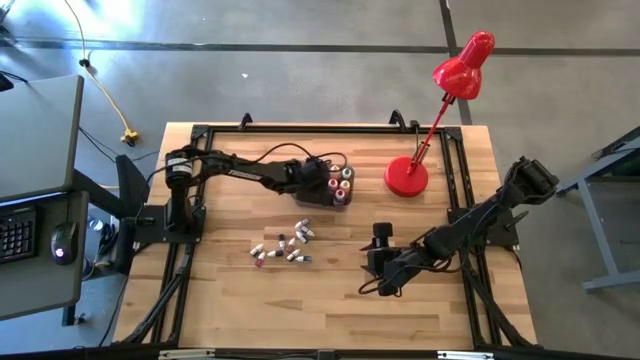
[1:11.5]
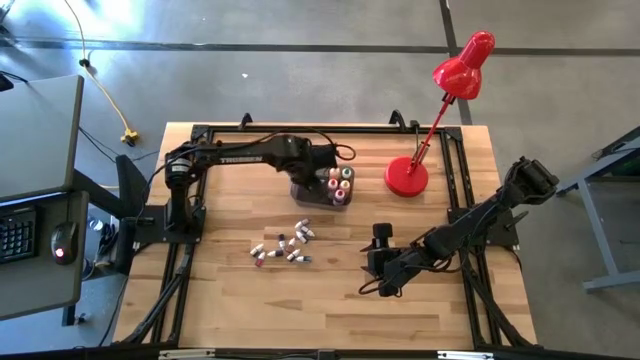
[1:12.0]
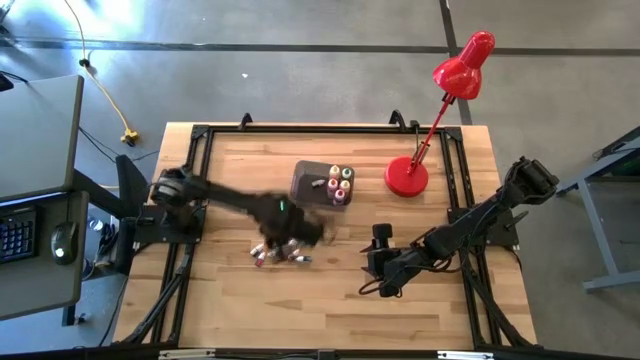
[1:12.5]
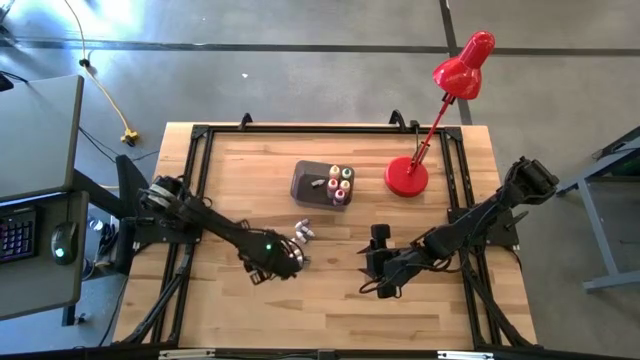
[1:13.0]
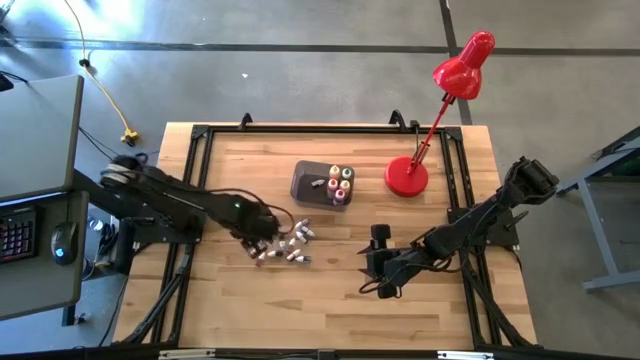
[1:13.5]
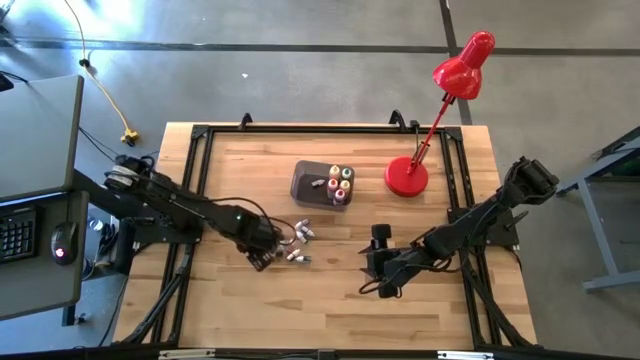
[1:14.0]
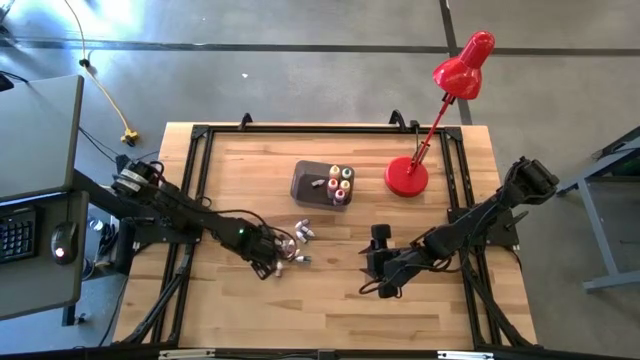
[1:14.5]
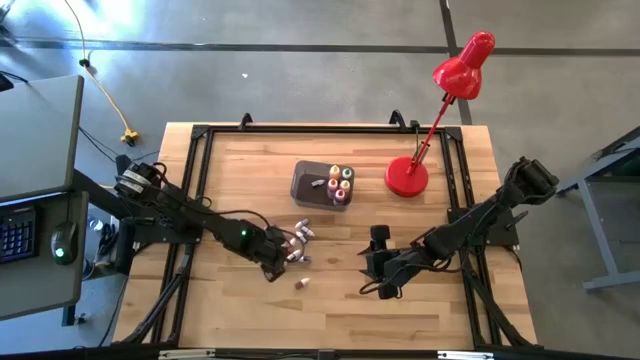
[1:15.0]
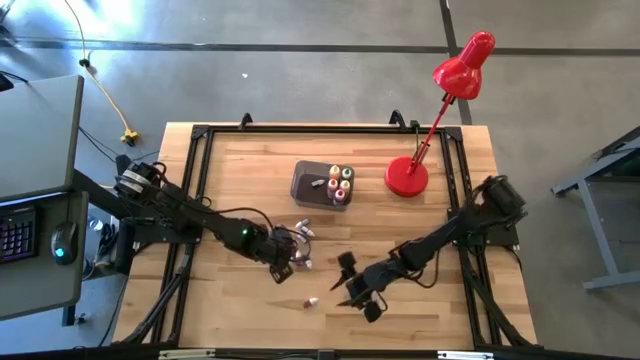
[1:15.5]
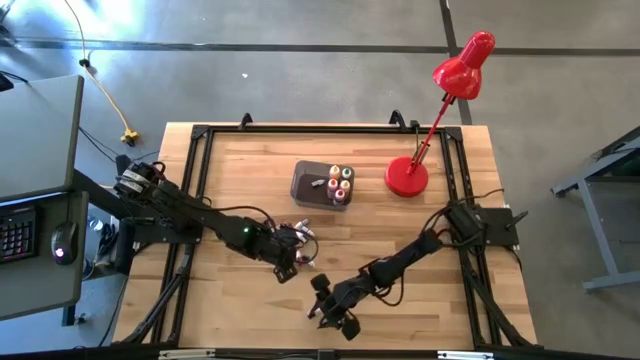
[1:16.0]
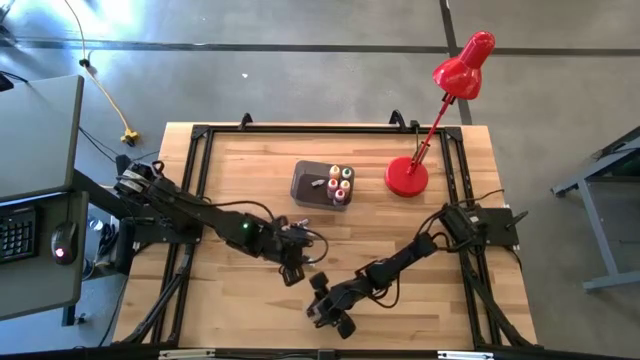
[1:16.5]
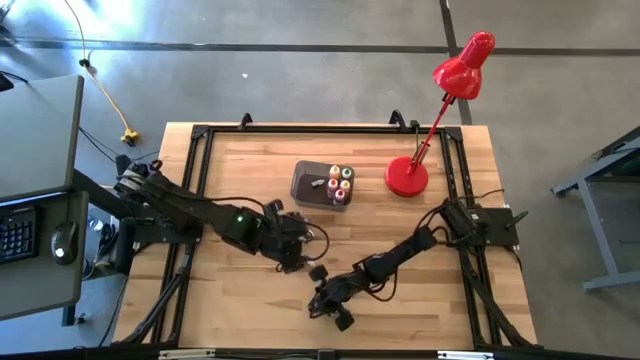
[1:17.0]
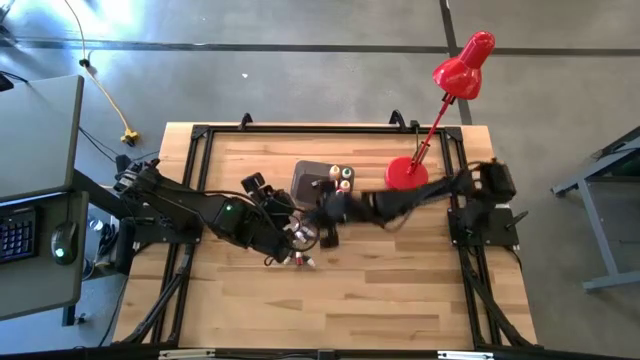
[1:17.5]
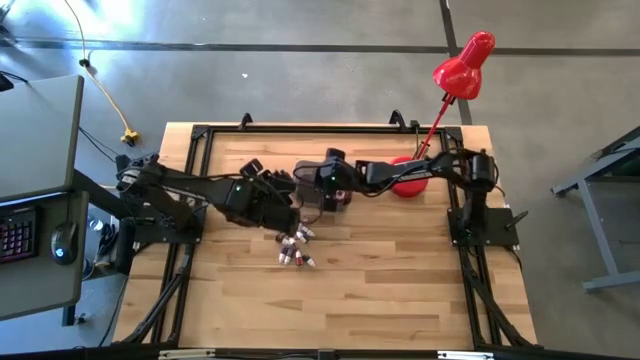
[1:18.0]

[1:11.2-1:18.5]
Task: Pick & Place food coloring
Put the small red food coloring bottle into the black bin

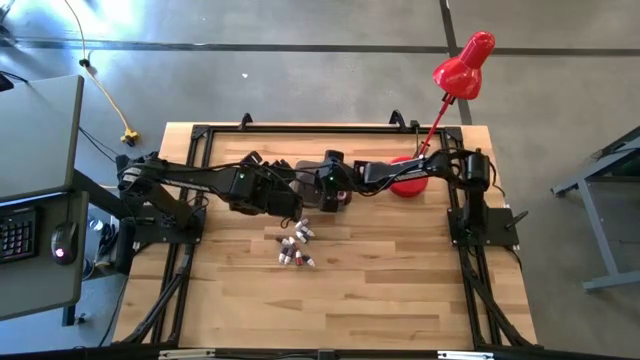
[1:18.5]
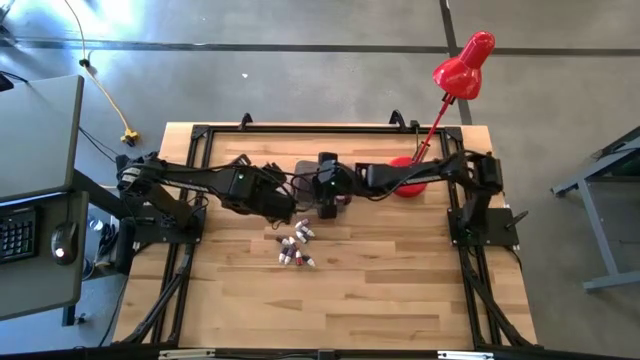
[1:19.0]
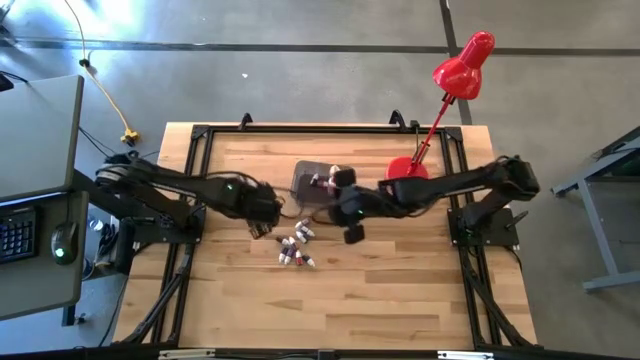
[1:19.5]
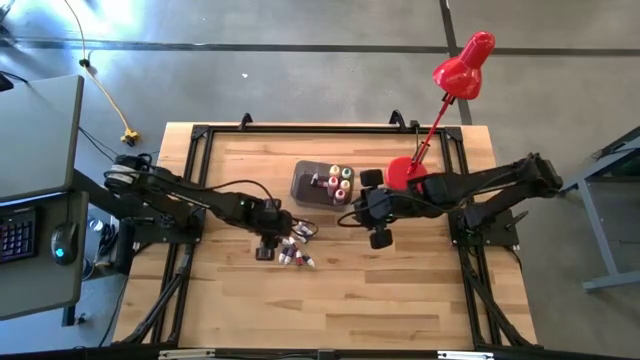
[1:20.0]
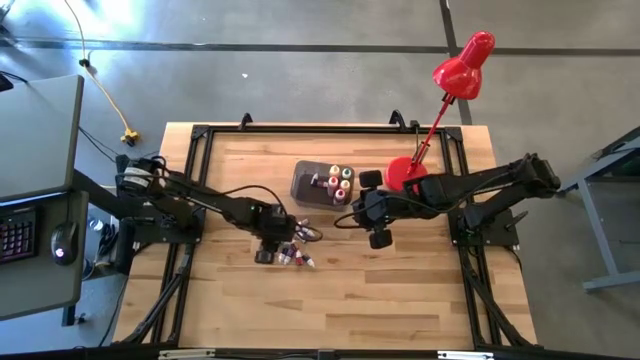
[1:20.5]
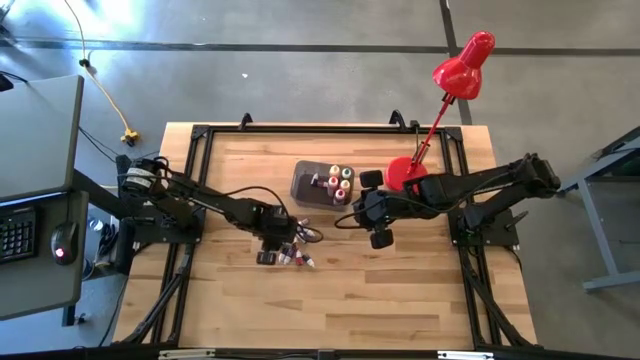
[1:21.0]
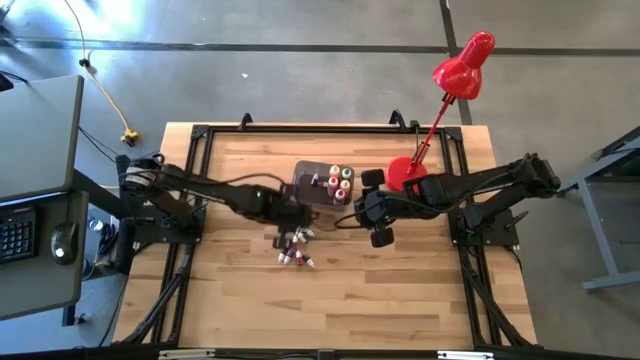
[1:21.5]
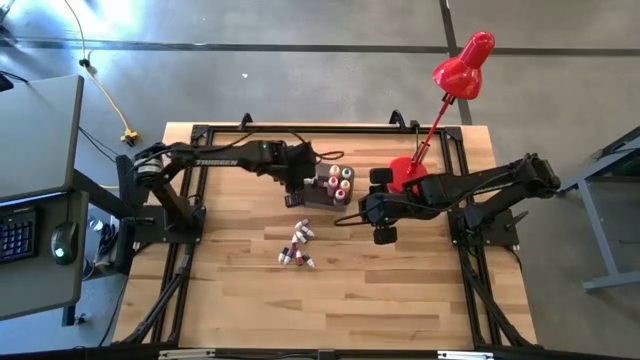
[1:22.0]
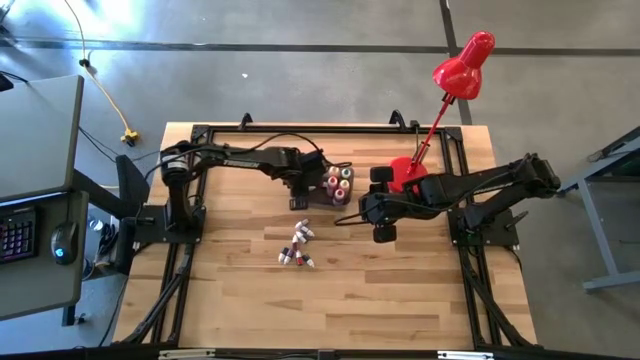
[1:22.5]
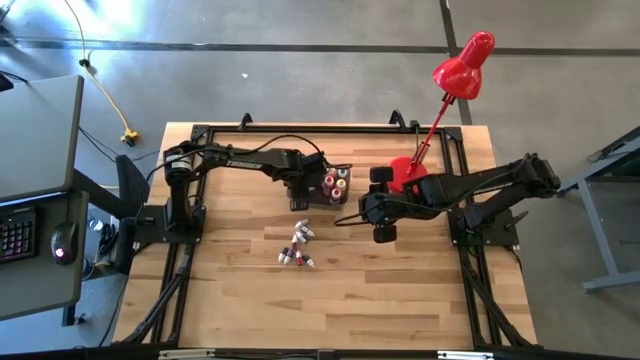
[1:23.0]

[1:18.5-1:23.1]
Put the small blue food coloring bottle into the black bin

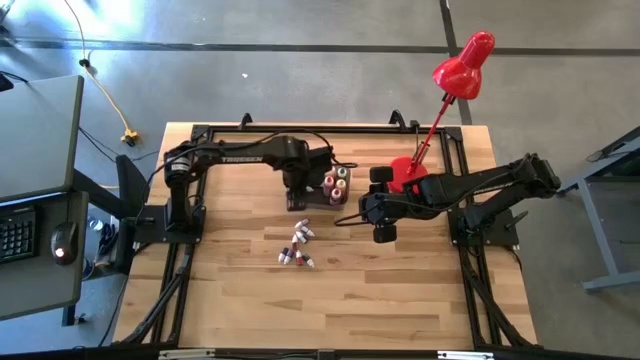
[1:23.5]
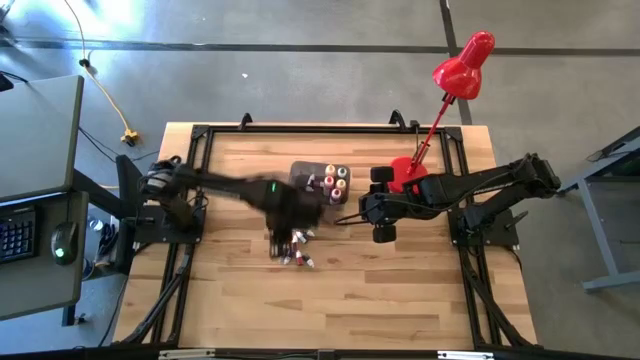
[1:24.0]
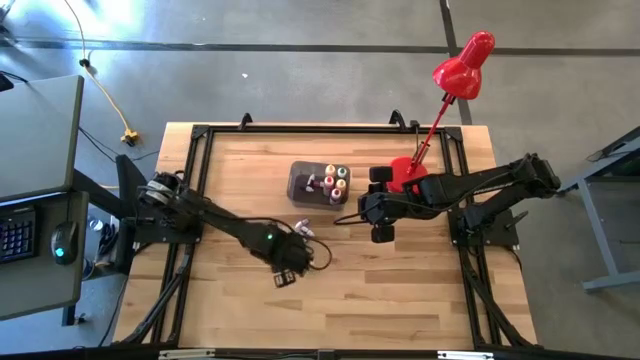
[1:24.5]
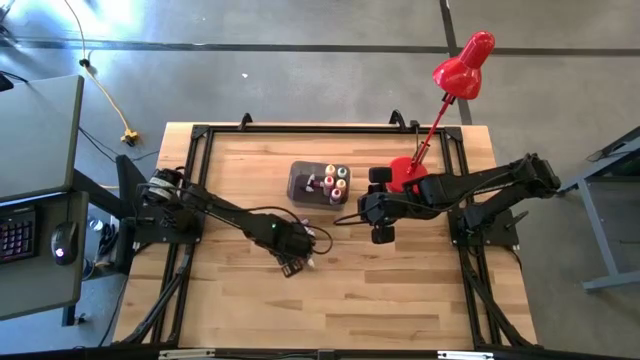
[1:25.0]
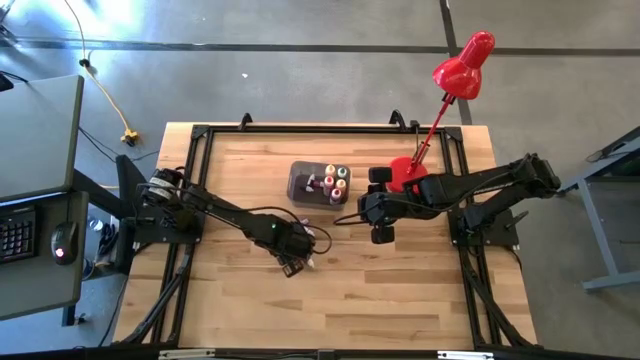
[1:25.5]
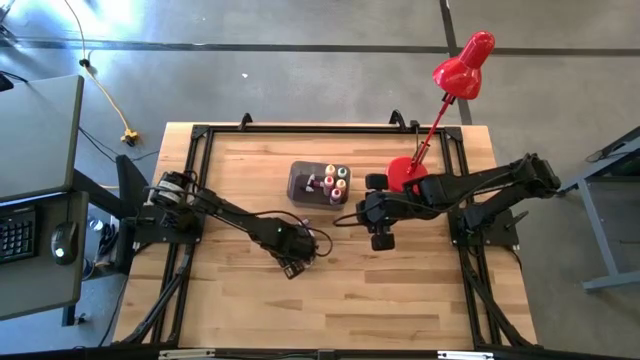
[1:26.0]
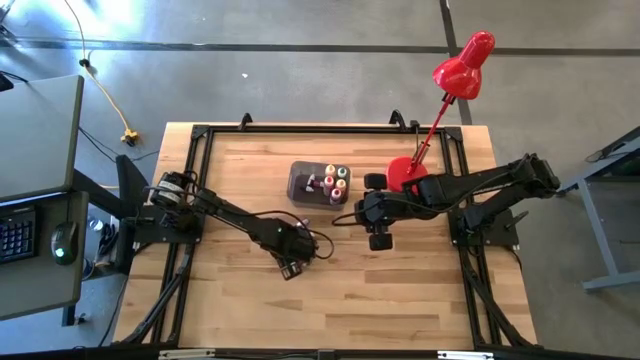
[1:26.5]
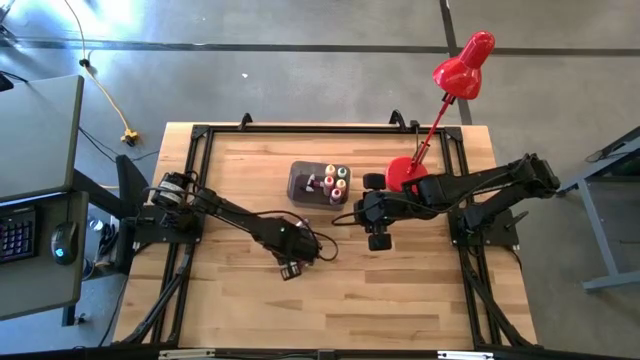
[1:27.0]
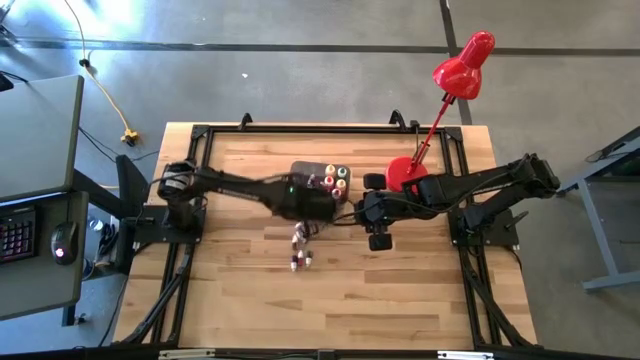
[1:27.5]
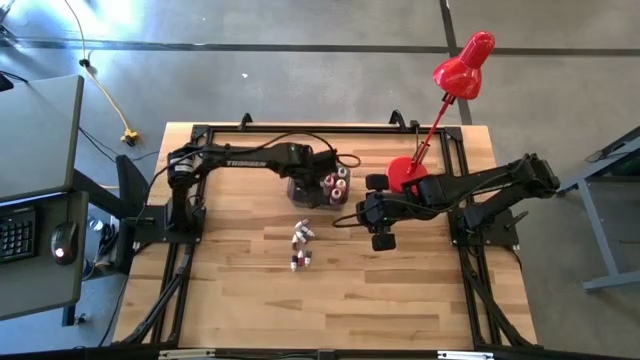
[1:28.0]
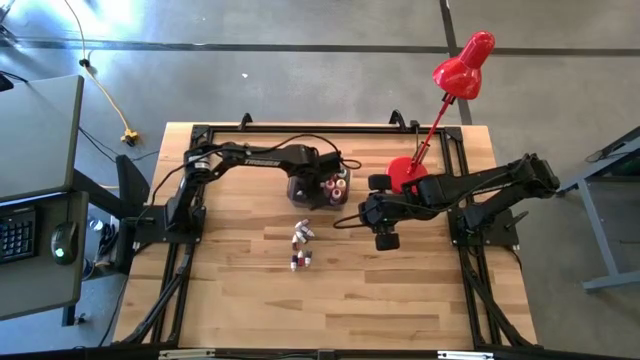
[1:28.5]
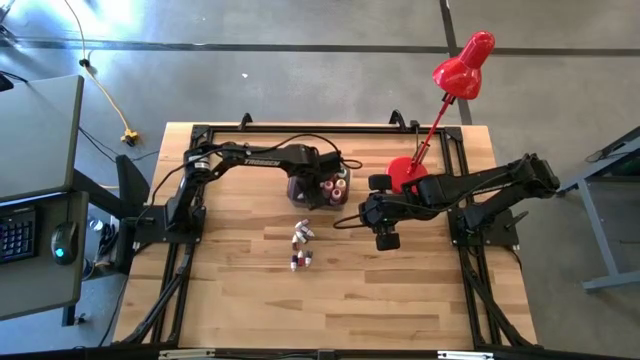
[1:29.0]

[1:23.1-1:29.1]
Put the small black food coloring bottle into the black bin

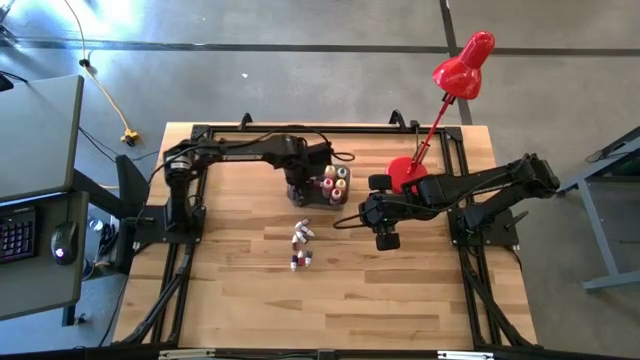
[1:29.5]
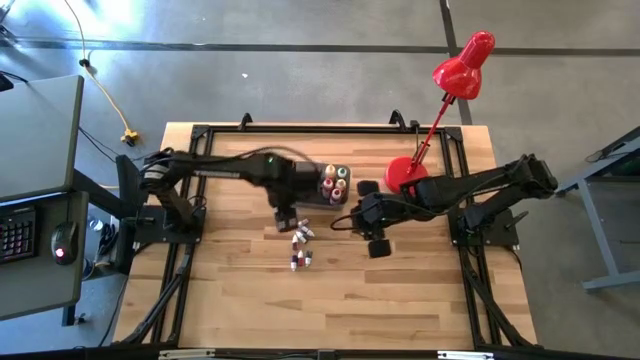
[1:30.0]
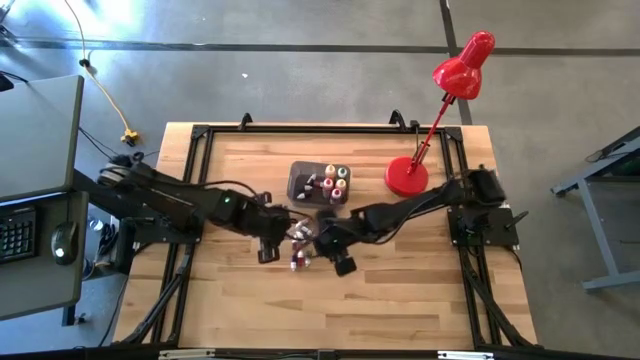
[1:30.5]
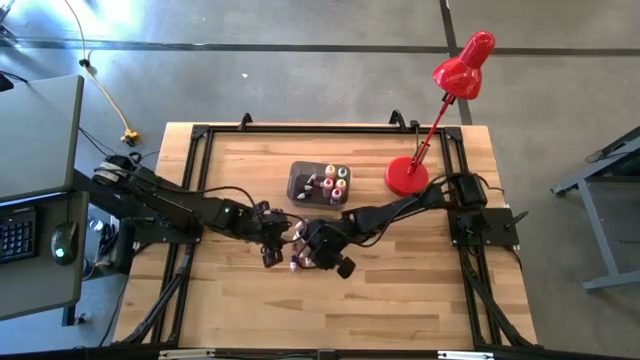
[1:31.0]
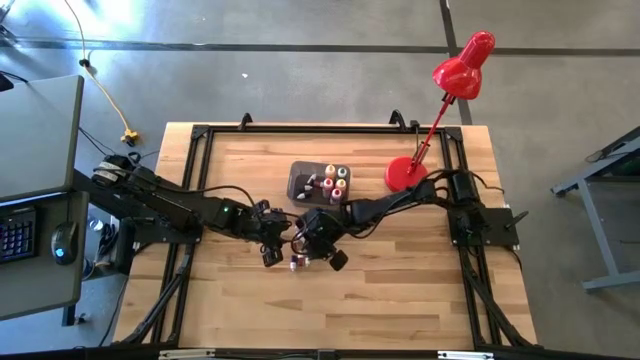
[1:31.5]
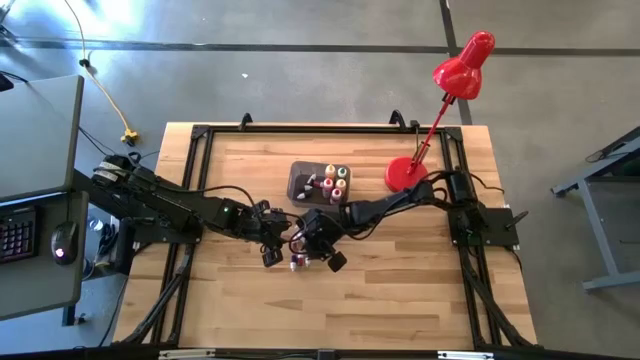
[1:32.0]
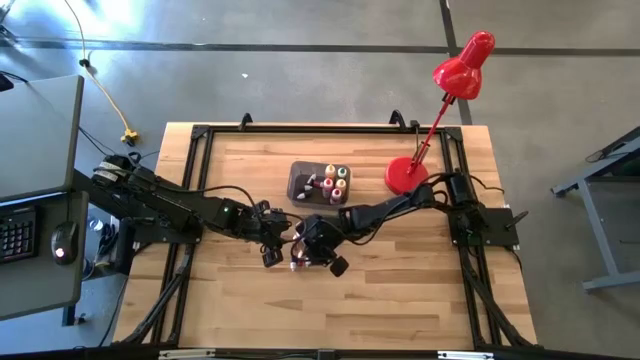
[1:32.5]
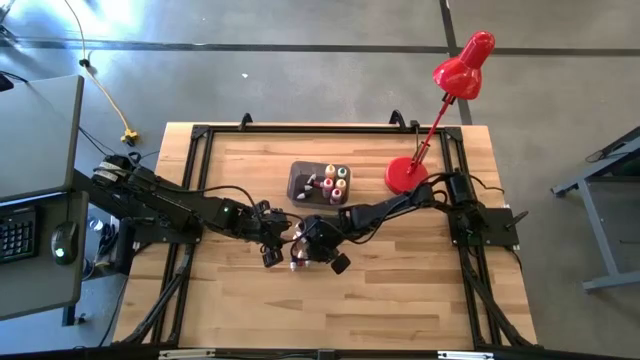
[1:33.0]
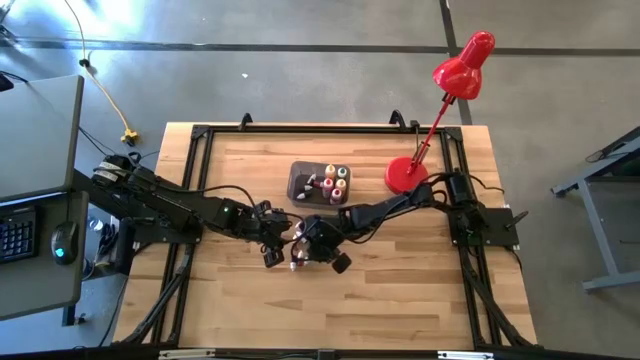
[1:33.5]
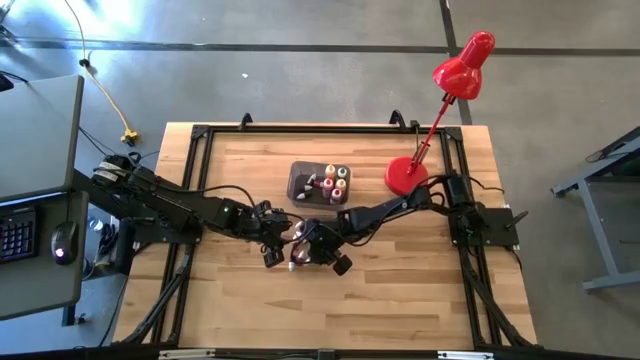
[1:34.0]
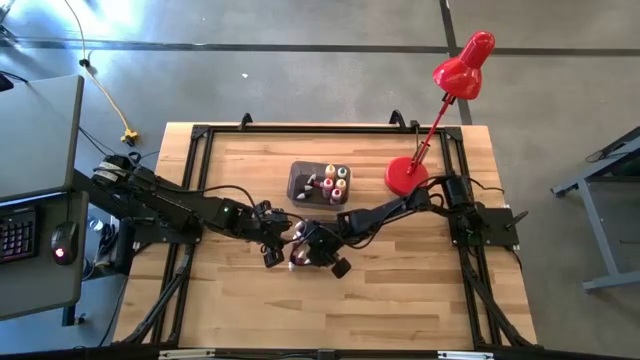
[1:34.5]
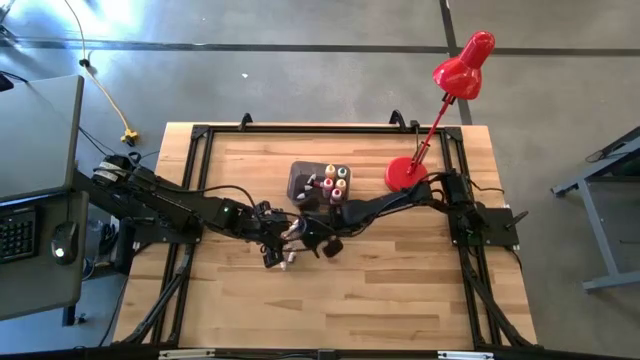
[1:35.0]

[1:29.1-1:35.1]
Put the small green food coloring bottle into the black bin
